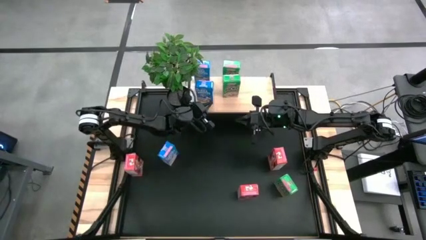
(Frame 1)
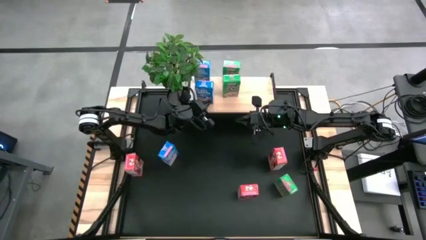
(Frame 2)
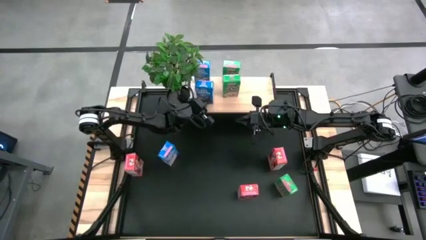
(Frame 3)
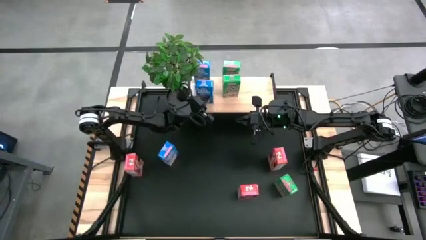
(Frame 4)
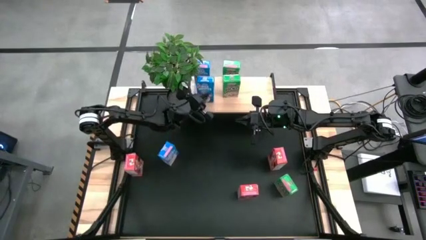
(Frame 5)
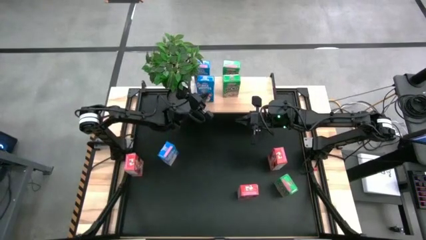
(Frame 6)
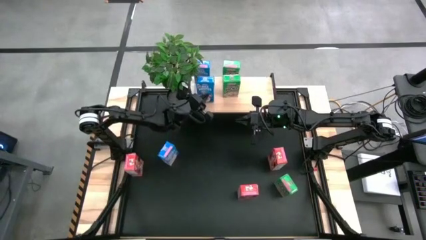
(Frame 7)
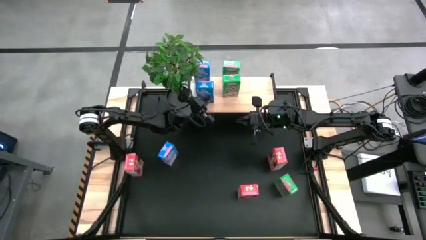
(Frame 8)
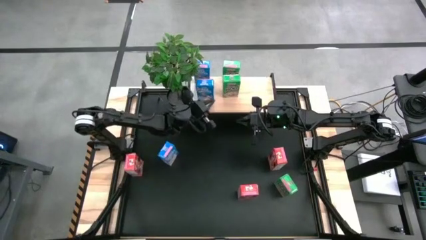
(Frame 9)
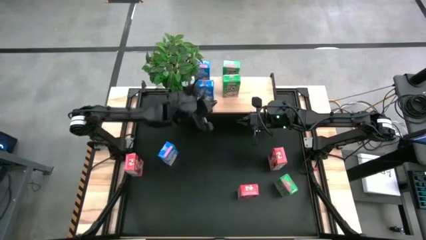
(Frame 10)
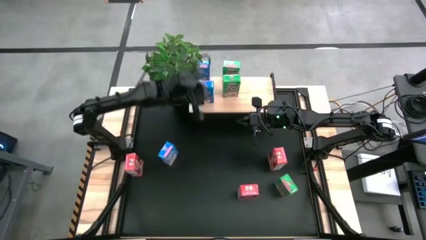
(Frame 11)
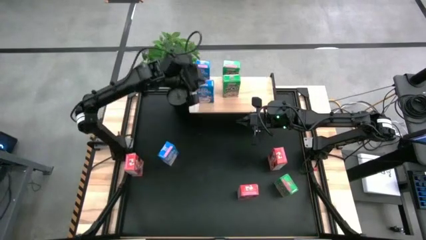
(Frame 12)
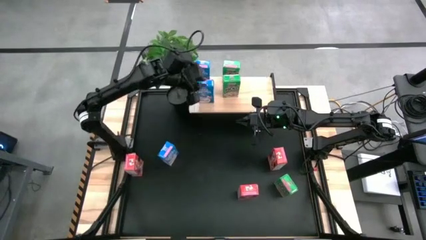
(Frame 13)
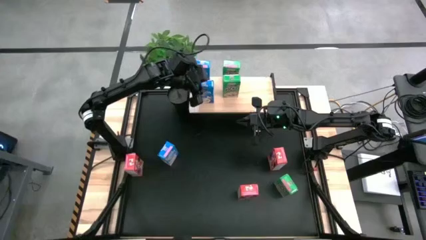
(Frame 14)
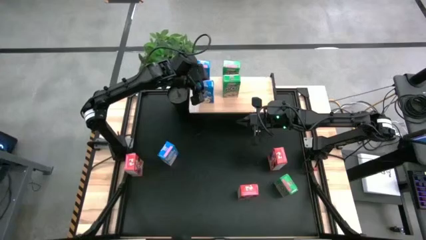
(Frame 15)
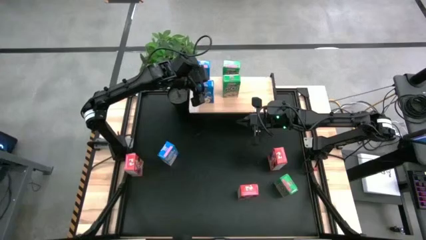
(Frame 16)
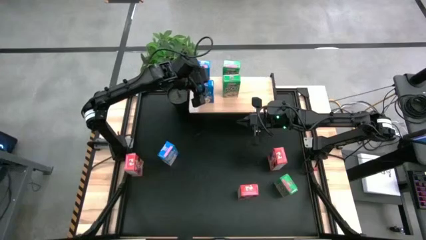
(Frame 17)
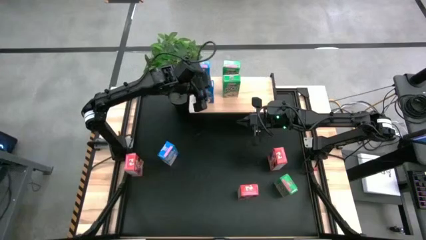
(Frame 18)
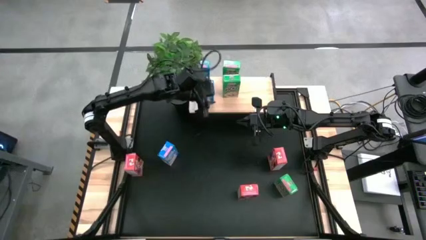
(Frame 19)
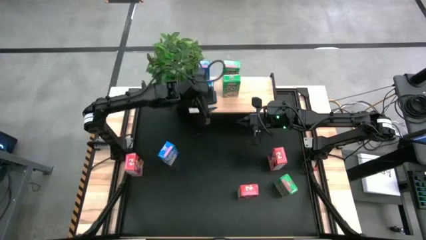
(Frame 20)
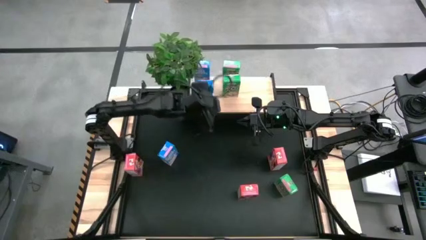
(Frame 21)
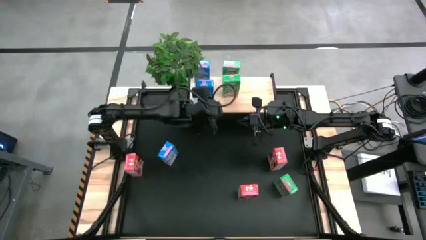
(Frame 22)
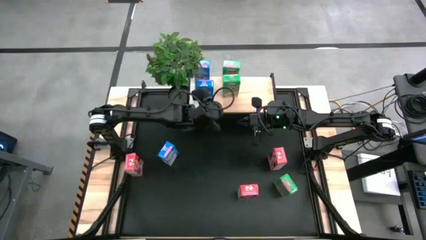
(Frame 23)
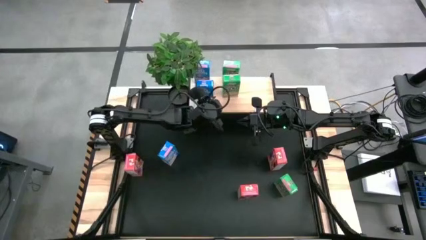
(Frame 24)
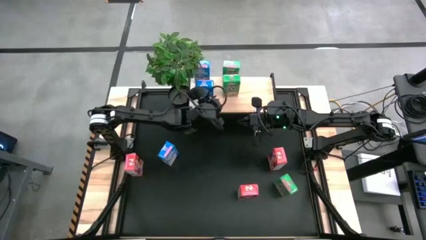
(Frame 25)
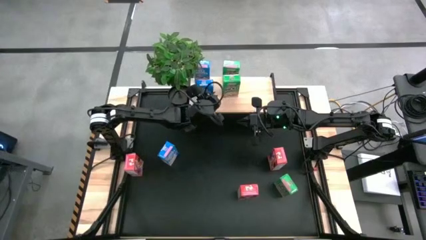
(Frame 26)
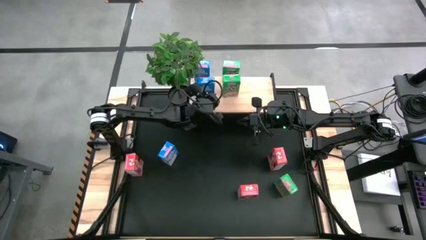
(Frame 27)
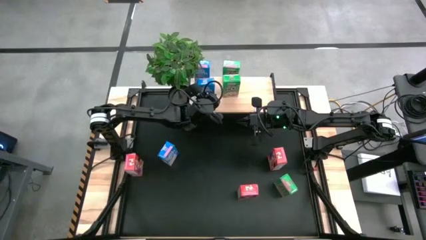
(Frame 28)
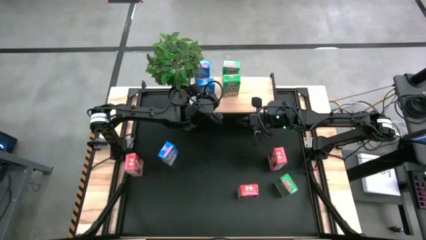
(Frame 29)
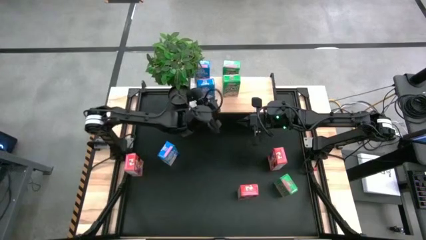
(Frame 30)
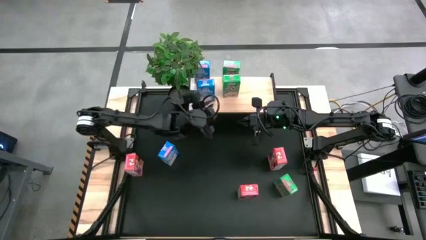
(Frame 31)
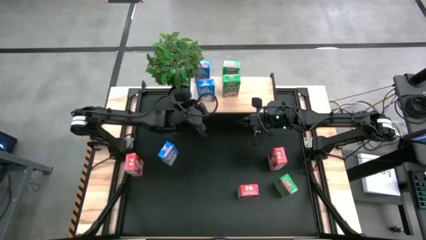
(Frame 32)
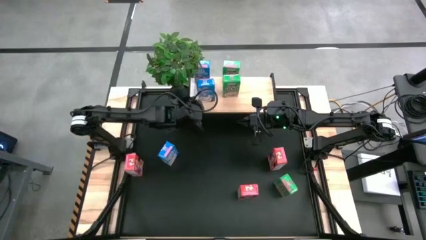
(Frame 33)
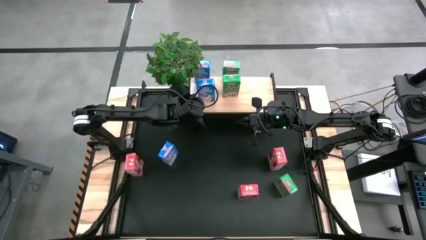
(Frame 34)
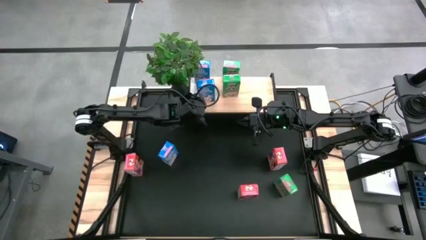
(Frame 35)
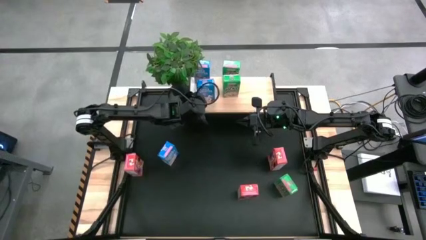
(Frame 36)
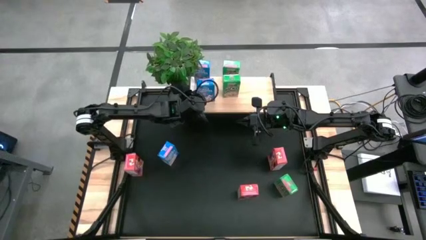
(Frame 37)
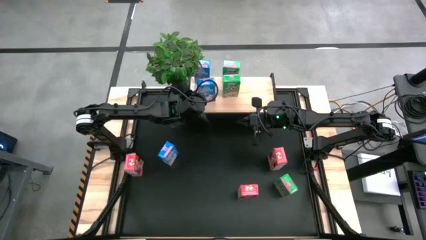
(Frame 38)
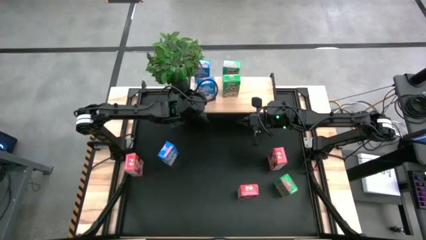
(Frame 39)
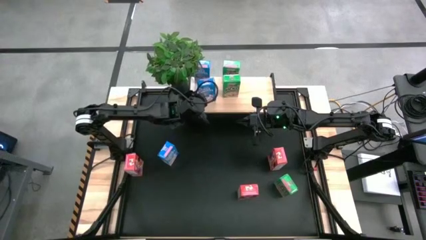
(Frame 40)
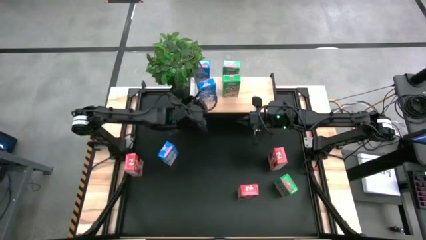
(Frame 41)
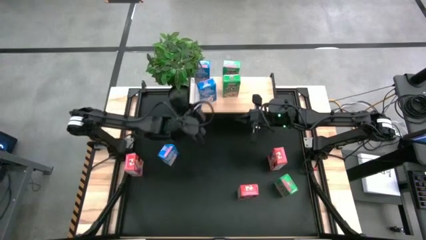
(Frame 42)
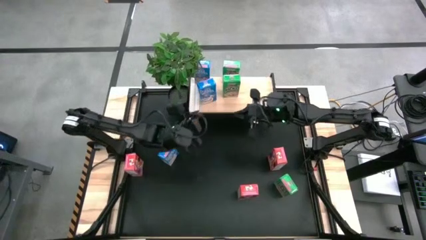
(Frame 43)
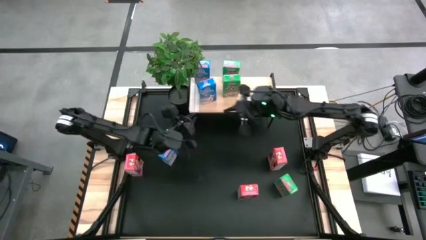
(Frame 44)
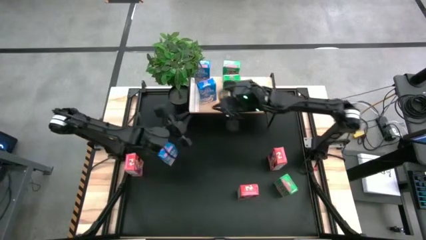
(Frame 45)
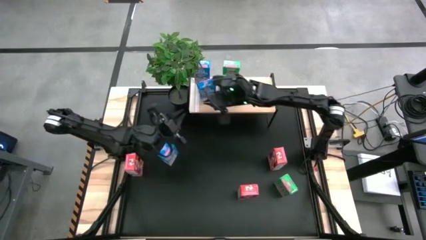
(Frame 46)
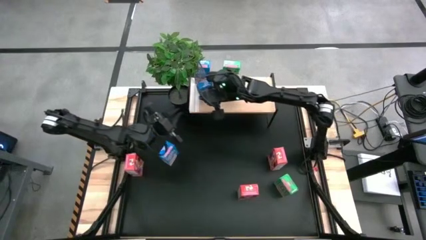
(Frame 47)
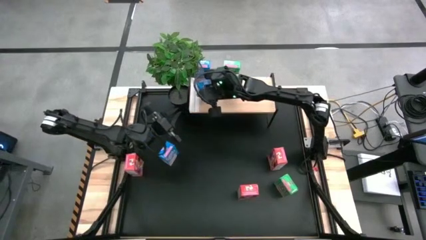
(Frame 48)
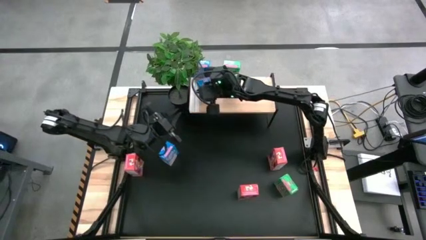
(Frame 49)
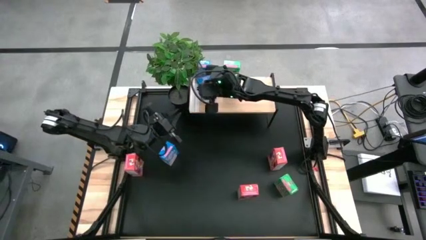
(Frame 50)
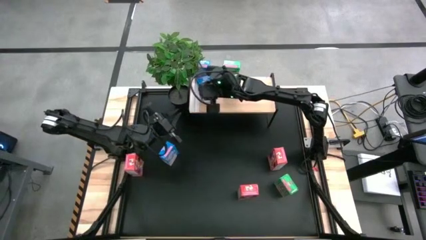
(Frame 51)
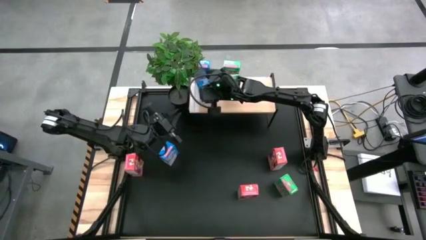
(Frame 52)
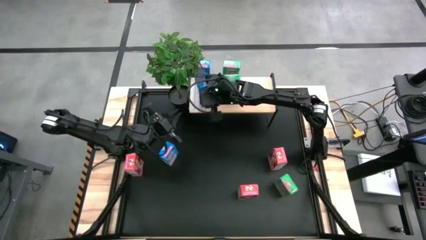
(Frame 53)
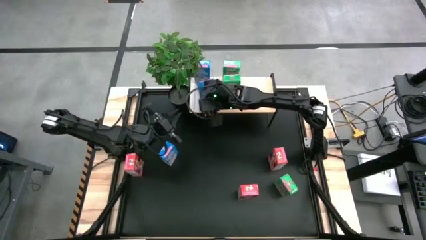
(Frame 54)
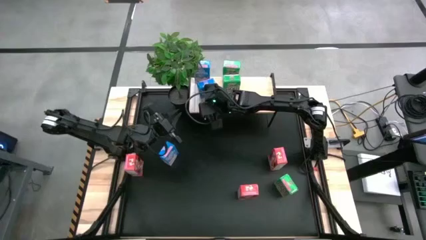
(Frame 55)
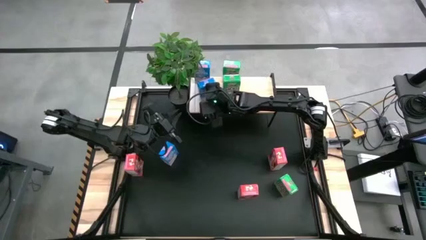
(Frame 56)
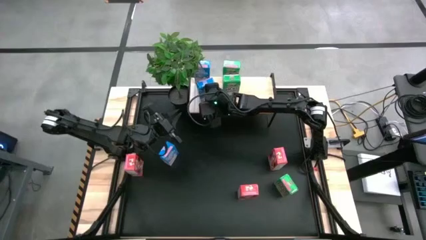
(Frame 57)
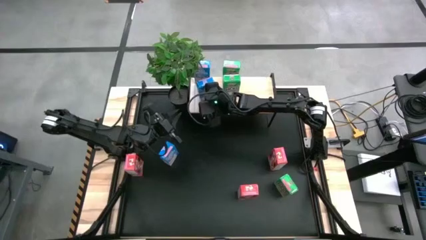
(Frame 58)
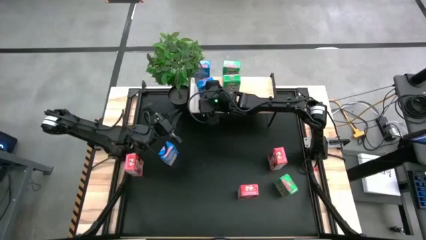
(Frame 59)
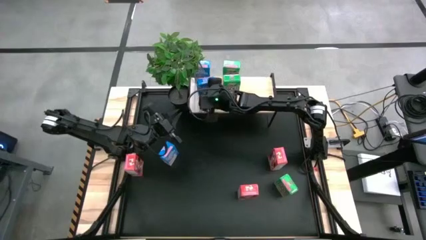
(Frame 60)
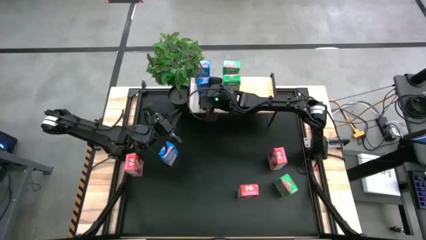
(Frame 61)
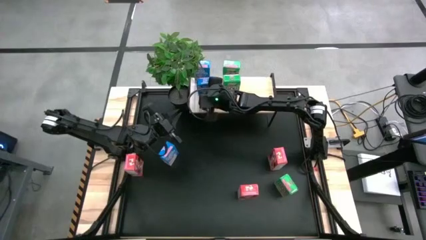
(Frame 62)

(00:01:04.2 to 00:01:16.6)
Task: Stack cereal on shelf
Put the right blue cereal box on the shelf, aligned with the other blue cereal box

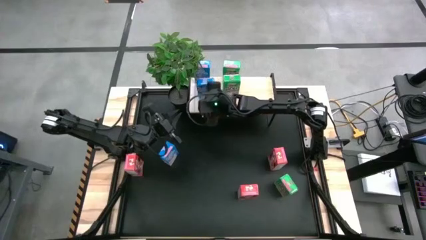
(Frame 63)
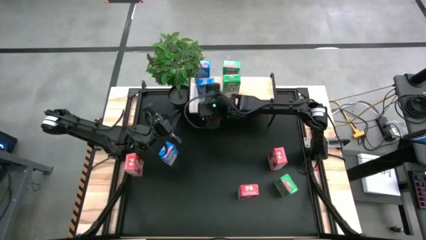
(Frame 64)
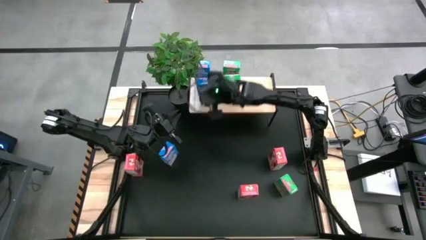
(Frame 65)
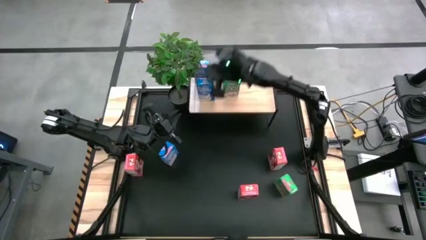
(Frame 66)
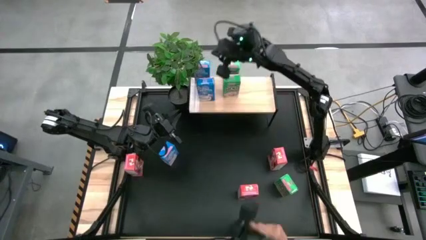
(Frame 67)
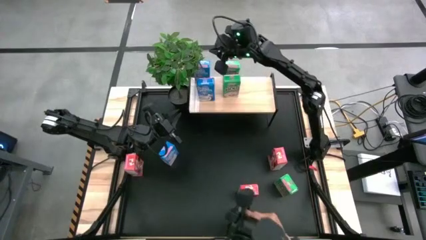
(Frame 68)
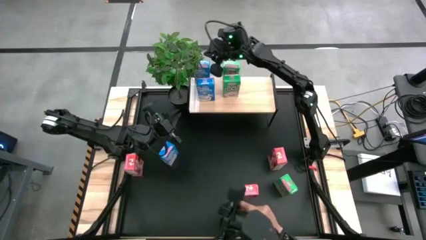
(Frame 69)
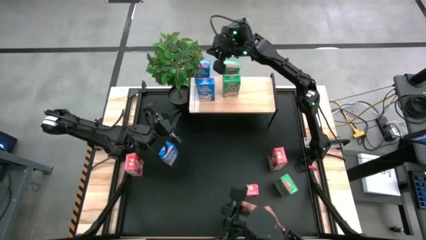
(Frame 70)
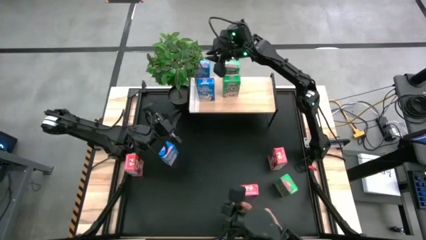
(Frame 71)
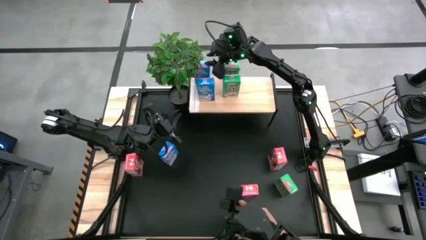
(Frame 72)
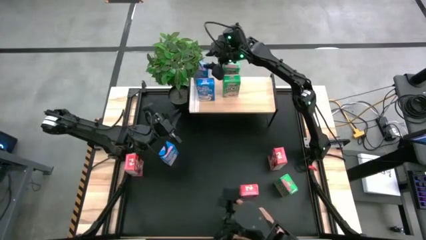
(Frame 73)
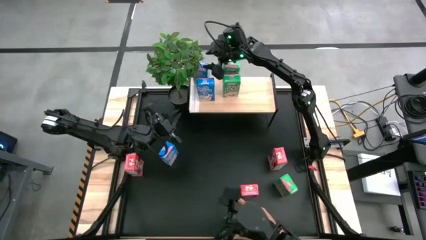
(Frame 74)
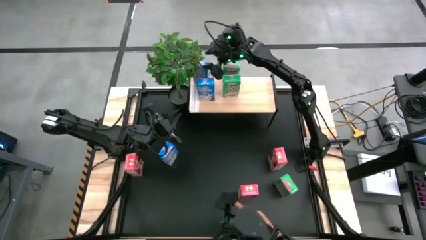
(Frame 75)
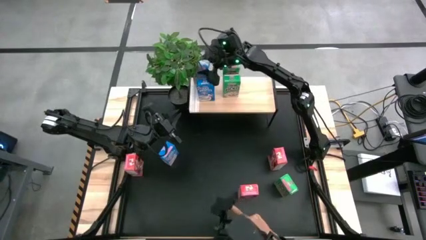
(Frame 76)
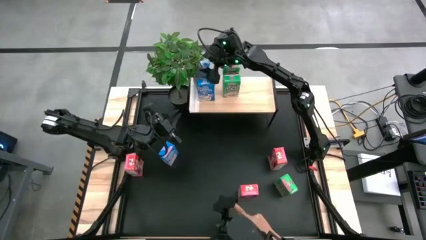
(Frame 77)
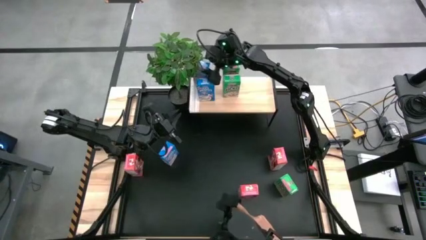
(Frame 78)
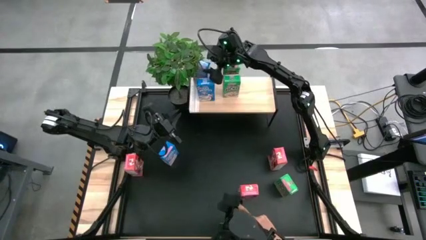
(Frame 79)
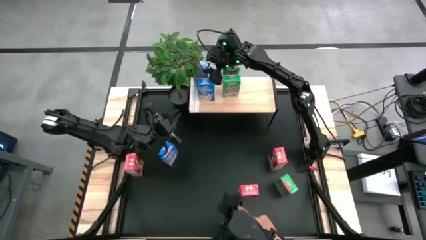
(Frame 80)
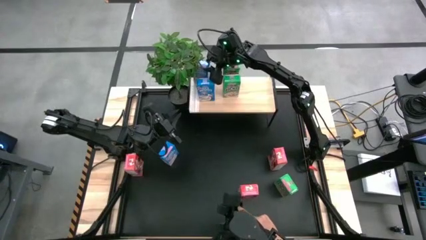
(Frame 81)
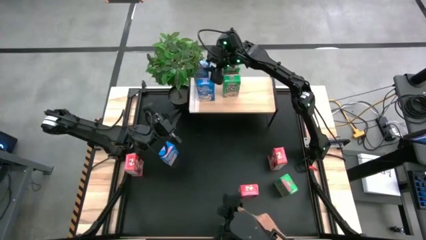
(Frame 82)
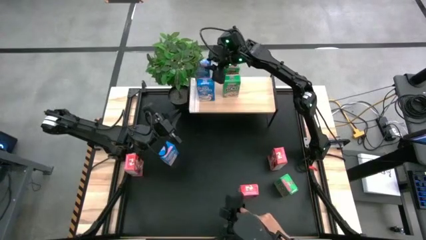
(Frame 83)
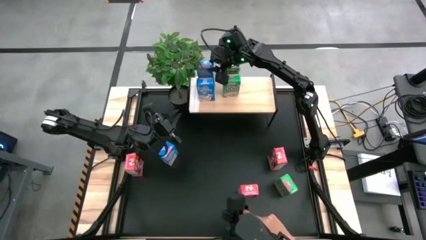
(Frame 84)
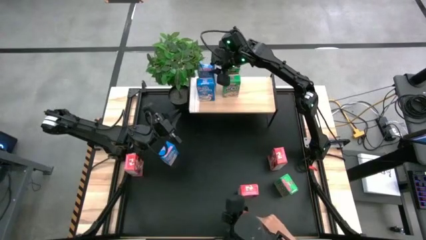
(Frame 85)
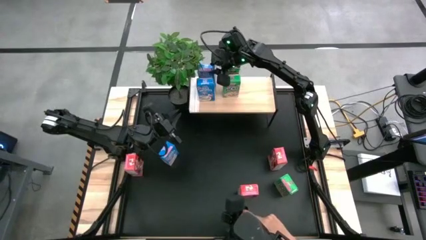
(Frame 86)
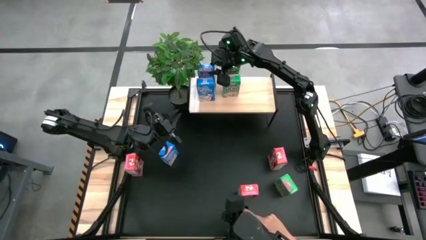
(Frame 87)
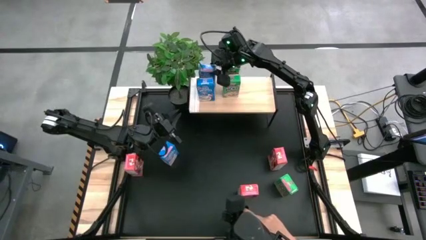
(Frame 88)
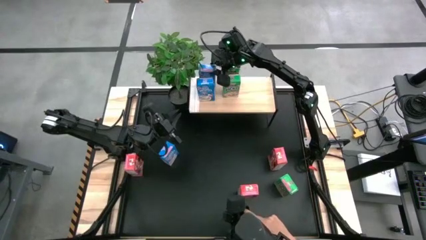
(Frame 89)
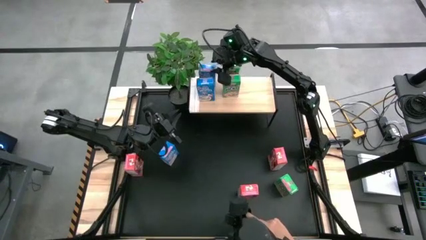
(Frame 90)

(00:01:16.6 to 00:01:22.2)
Adjust the blue cereal box on the shelf
